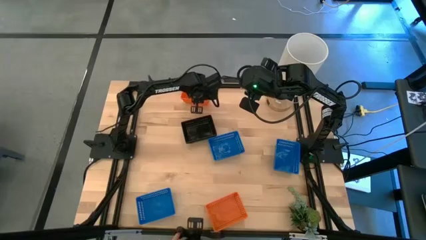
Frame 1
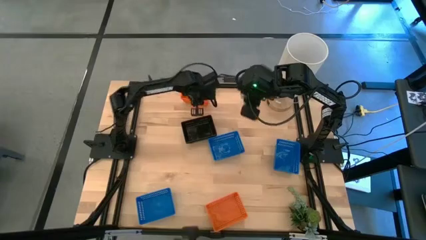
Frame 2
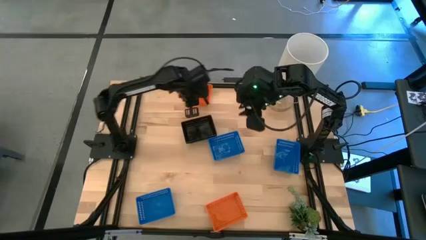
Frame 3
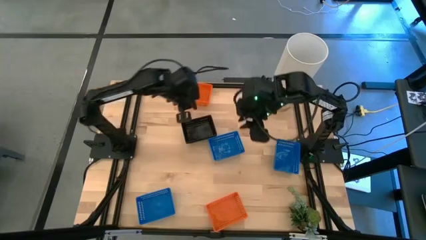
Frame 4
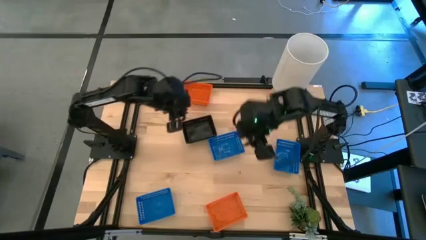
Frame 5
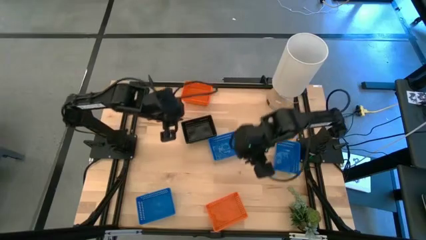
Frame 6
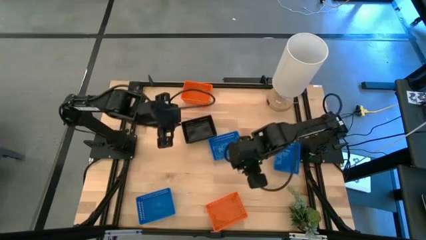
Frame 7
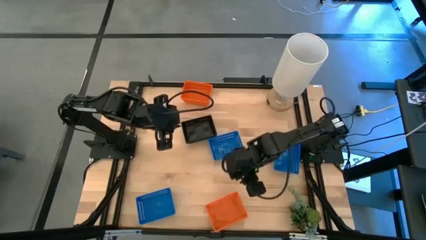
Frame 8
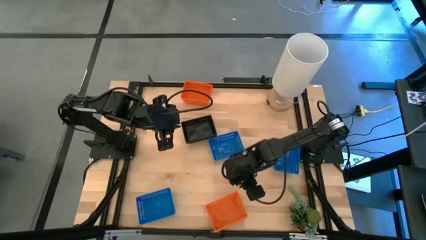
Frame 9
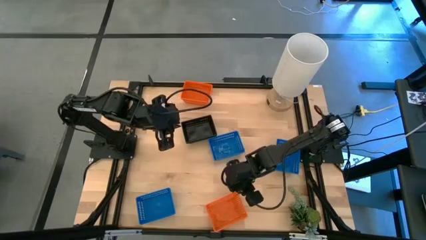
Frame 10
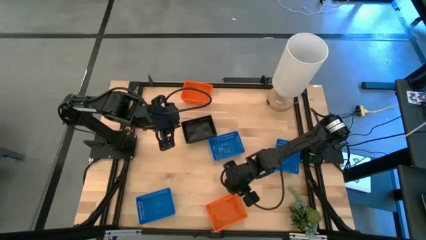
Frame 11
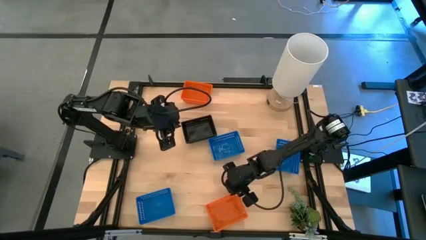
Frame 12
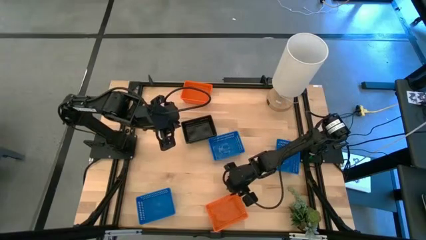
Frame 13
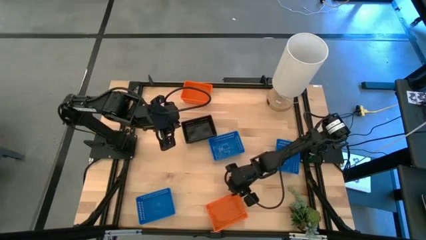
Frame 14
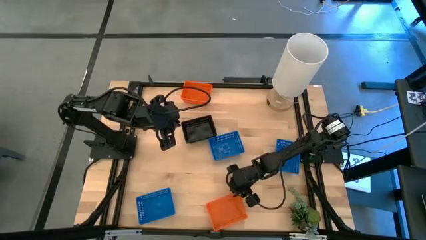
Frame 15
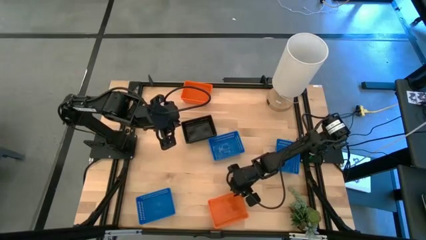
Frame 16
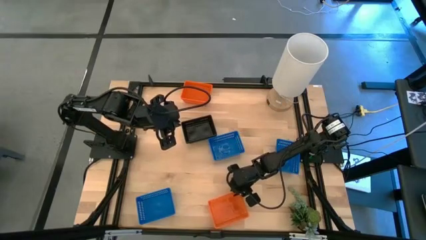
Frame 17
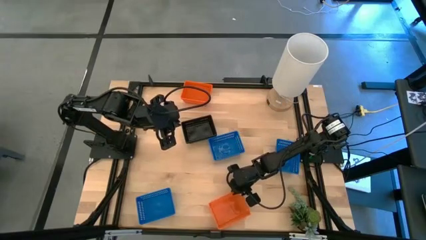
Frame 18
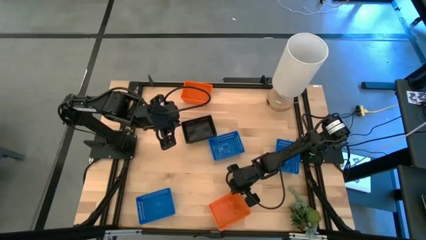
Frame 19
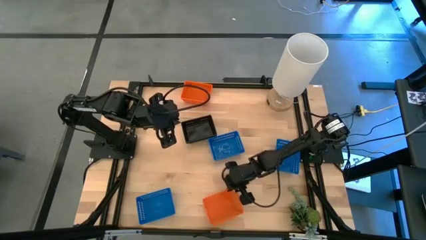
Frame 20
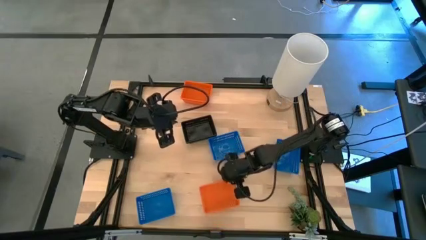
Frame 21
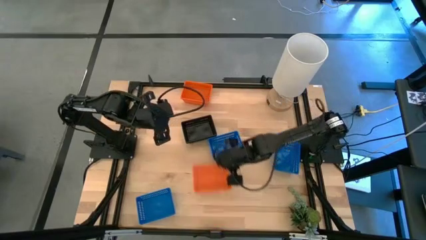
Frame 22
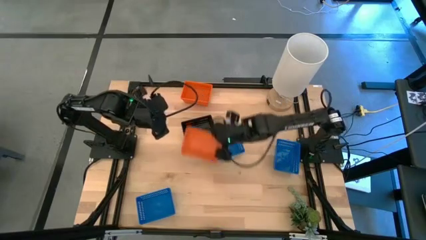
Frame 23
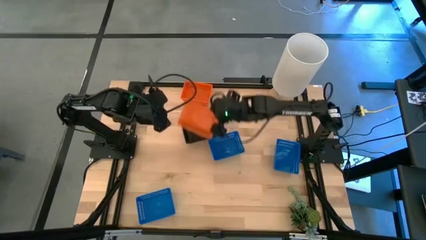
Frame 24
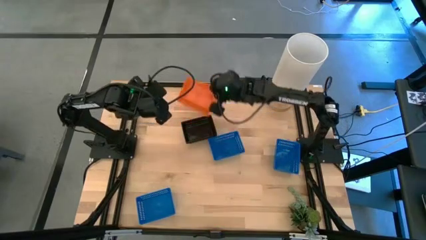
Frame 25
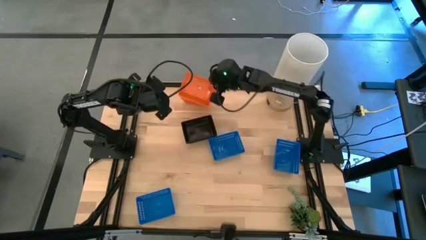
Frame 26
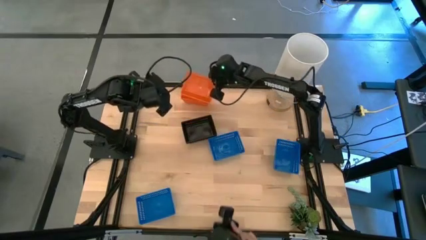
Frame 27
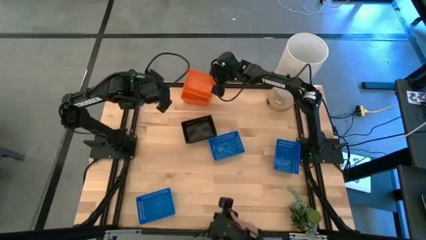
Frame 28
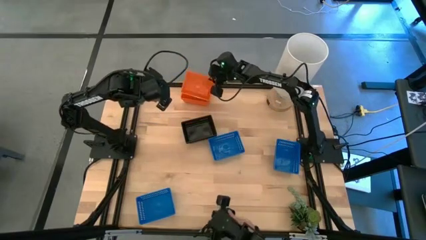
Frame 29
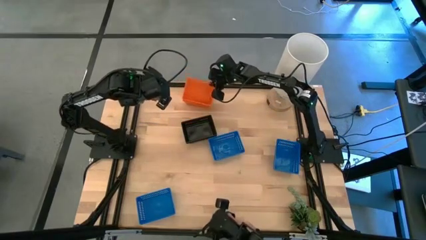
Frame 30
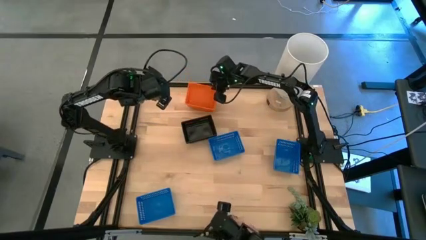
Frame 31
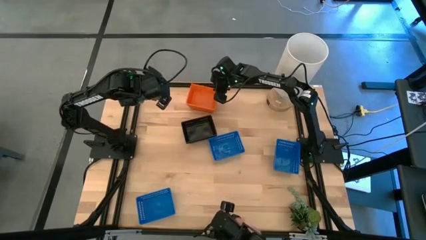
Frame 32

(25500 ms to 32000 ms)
Stack the bottom orange bin on top of the top orange bins

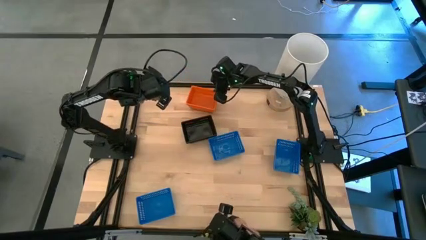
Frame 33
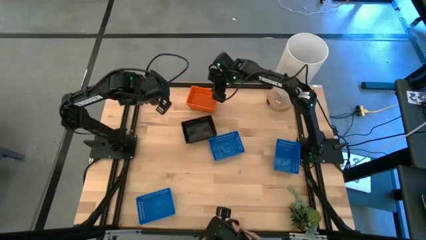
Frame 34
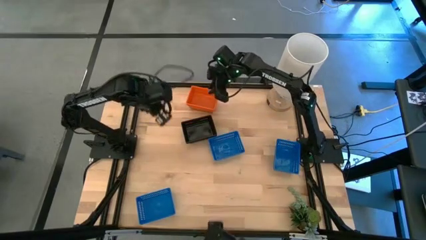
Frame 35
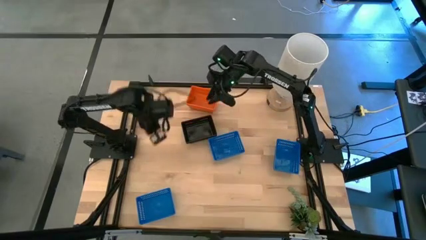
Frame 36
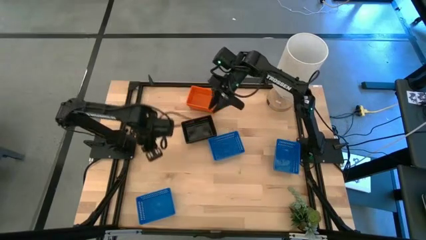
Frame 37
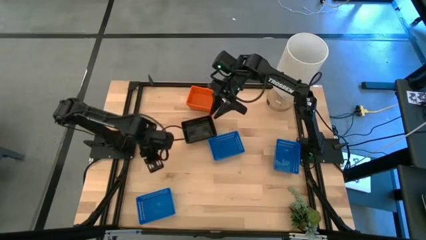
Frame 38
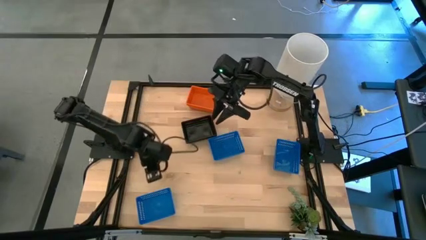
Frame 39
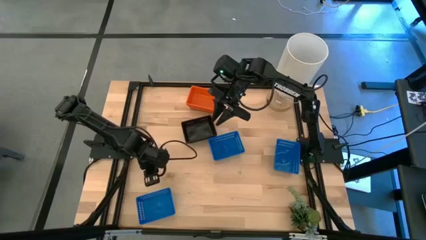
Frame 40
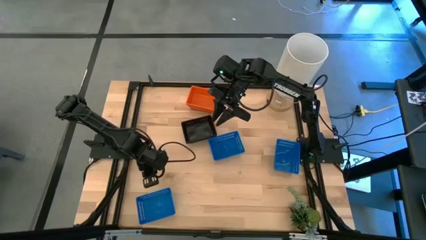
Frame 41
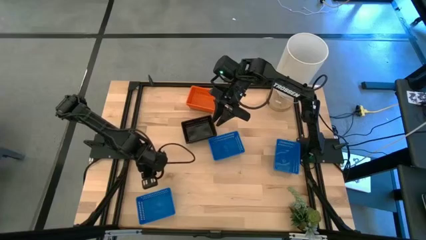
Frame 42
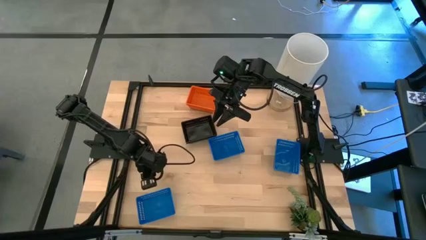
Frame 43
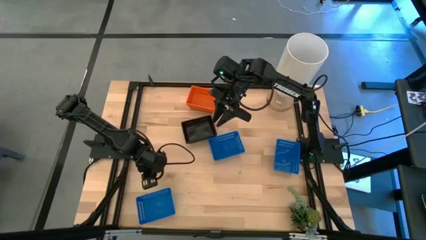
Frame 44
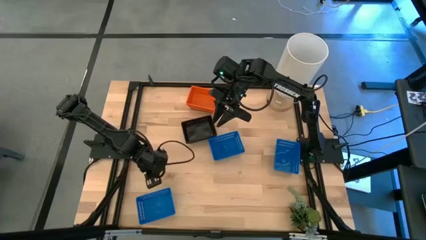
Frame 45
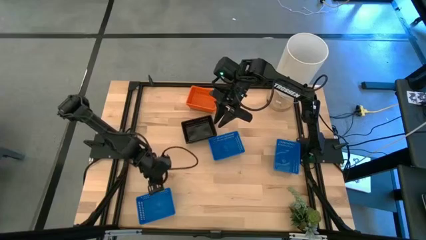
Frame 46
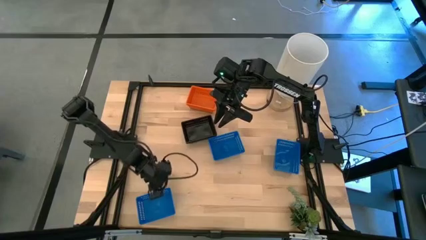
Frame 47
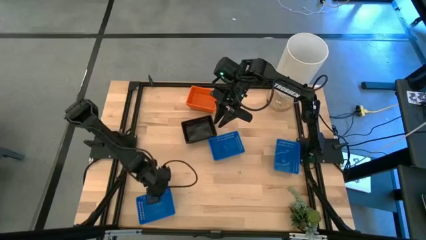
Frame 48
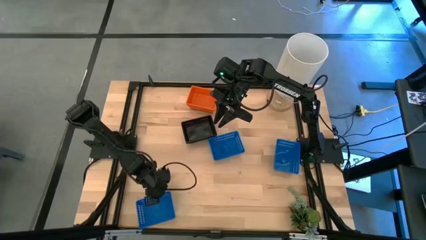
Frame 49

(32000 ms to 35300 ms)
Stack the bottom blue bin on top of the top left blue bin

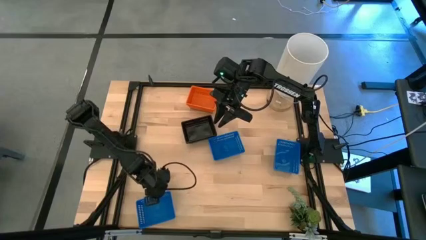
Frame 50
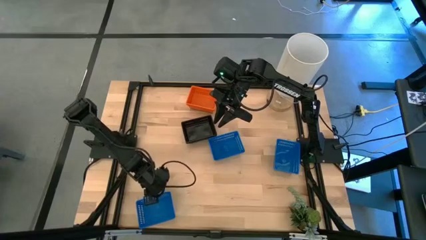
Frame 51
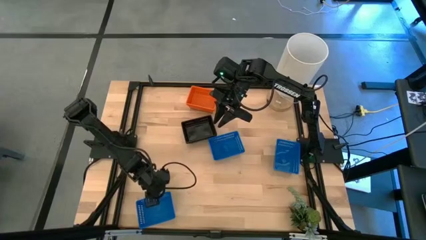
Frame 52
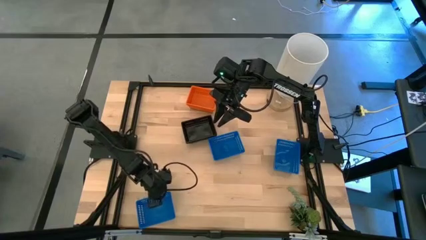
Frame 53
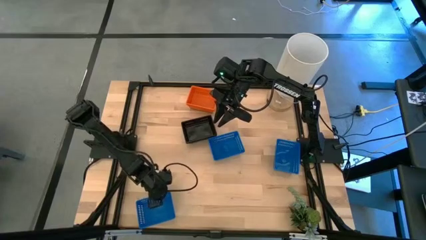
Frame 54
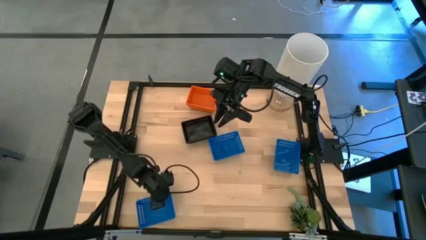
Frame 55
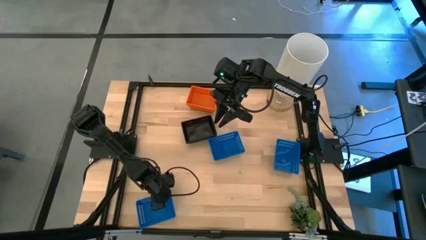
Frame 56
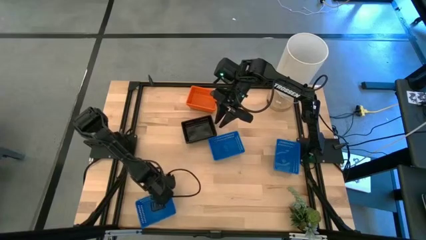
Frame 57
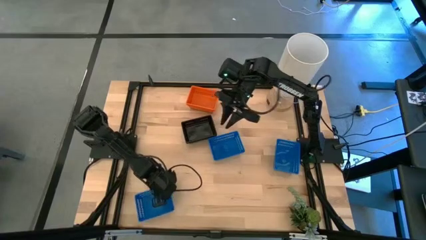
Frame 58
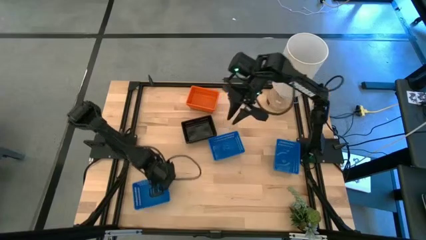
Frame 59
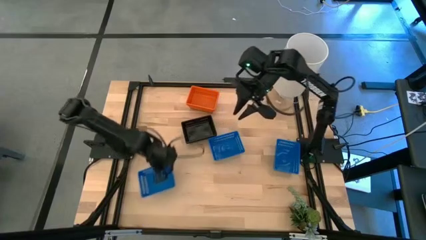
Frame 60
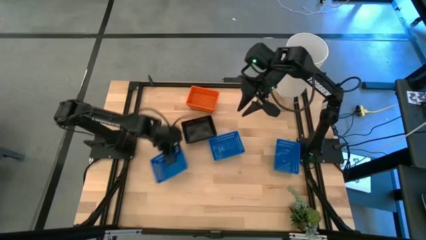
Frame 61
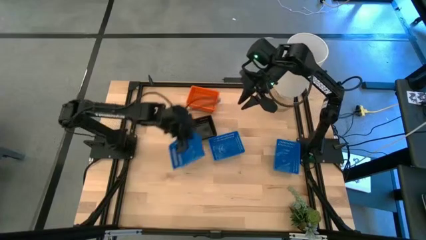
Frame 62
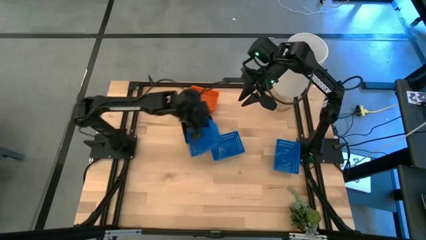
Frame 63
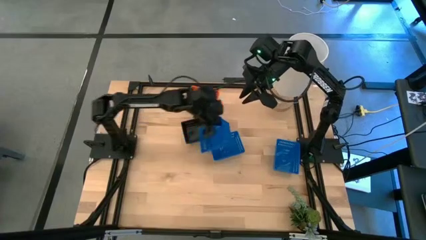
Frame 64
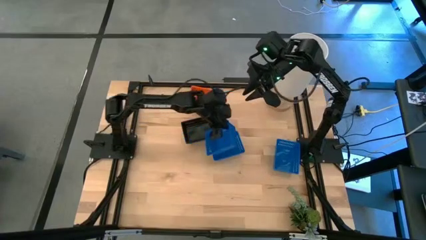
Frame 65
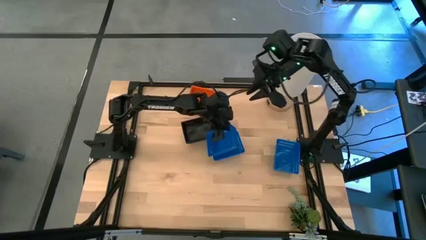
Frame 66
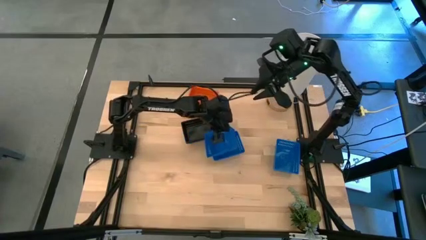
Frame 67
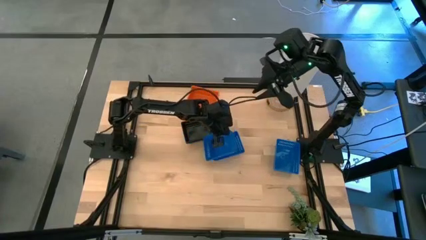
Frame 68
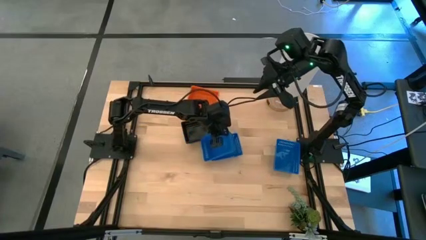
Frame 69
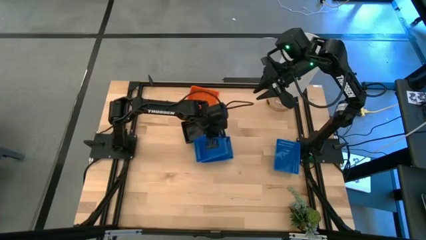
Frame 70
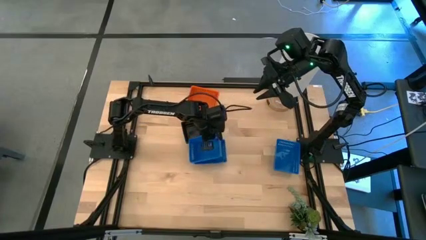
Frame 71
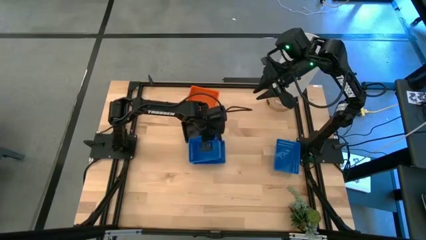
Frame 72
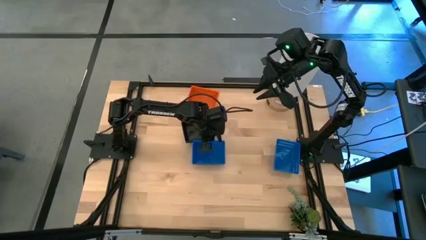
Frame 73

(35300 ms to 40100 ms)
Stack the bottom blue bin on top of the top left blue bin

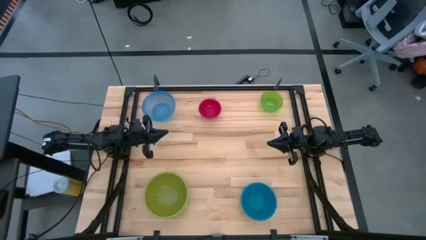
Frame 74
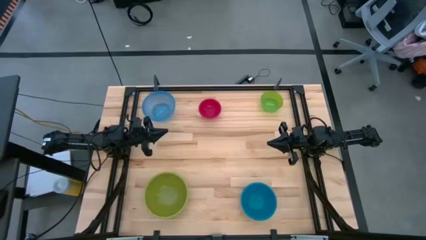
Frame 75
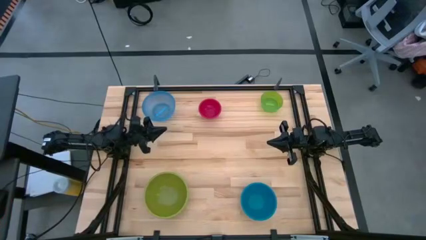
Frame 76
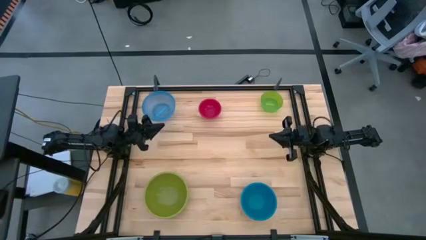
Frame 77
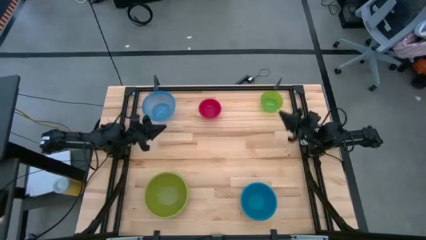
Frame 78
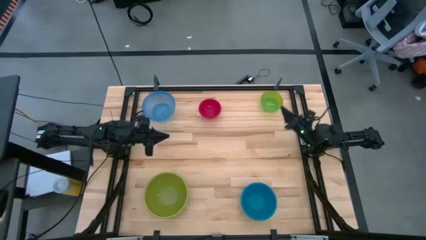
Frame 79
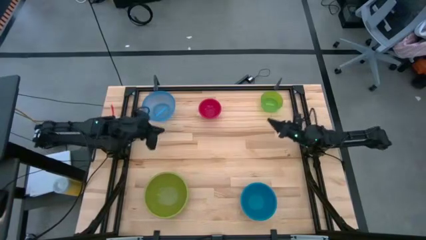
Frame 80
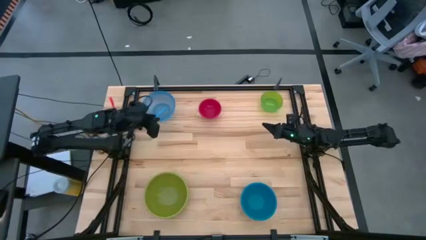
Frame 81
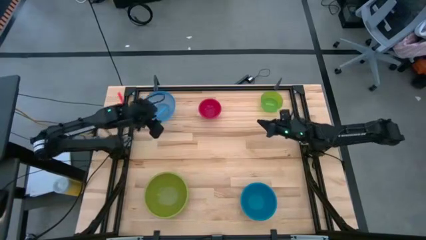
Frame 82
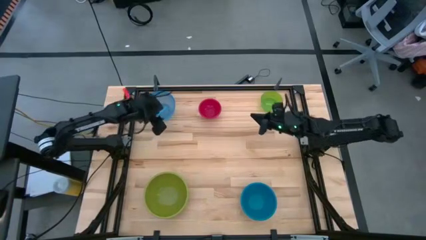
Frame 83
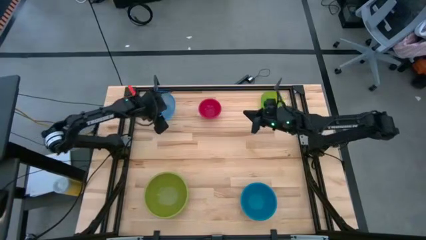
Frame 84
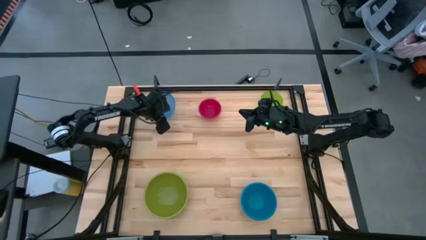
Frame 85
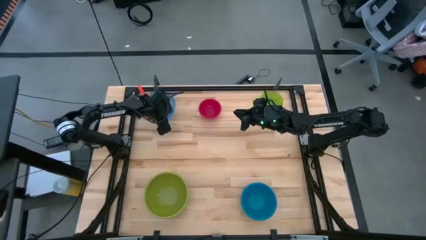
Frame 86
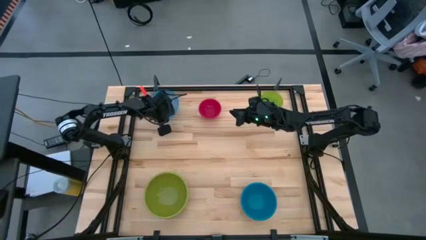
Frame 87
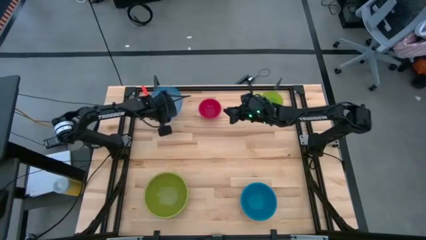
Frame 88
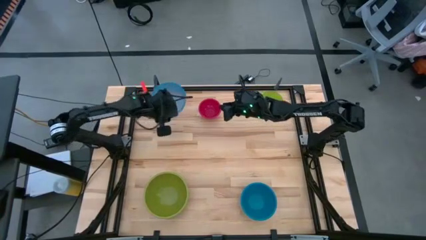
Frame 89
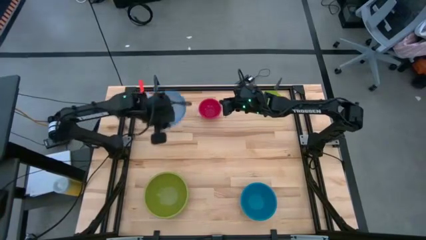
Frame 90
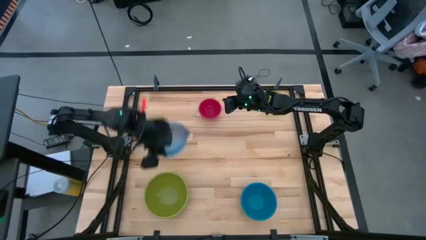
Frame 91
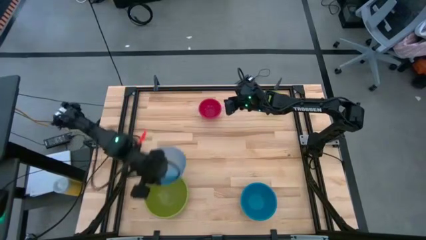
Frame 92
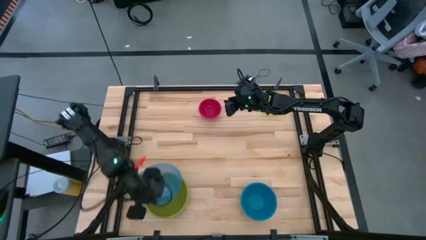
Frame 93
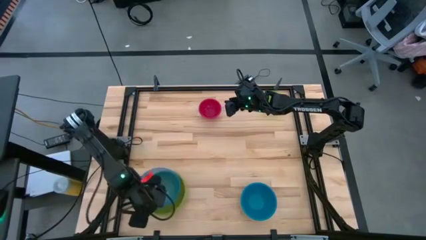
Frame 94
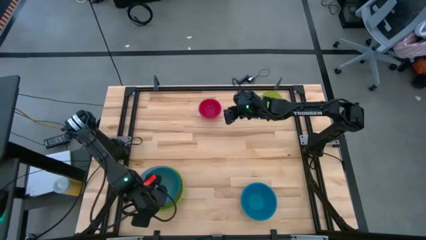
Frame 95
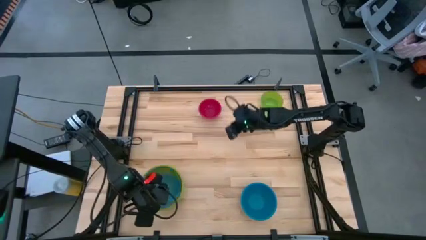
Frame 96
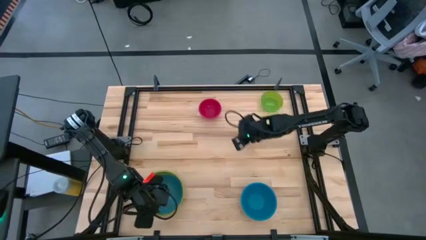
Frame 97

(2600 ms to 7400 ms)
Stack the light blue bowl on top of the green bowl
